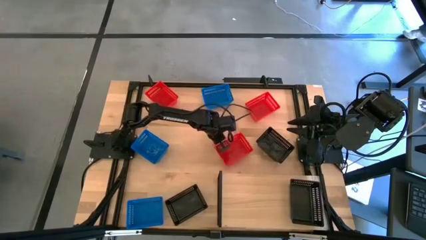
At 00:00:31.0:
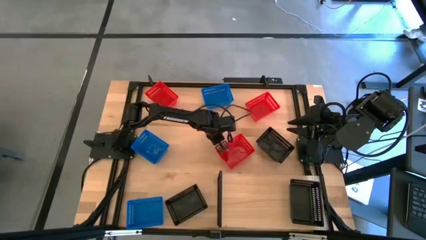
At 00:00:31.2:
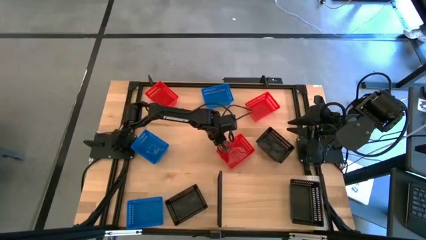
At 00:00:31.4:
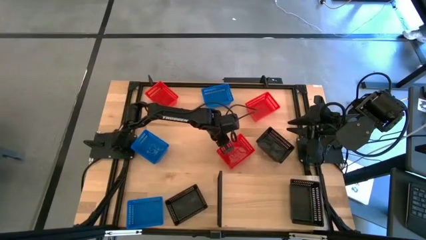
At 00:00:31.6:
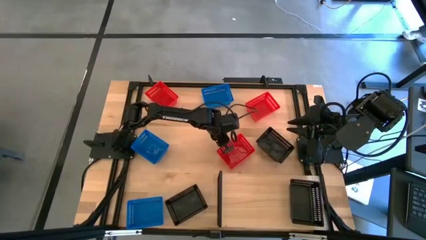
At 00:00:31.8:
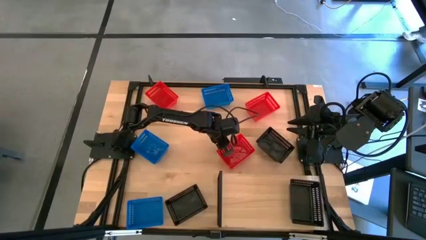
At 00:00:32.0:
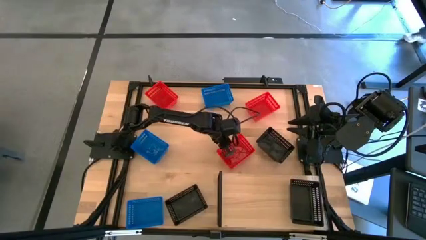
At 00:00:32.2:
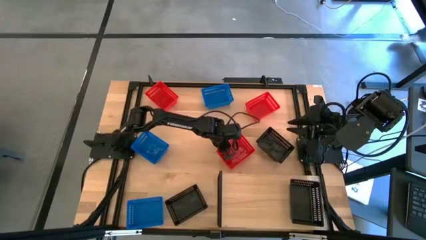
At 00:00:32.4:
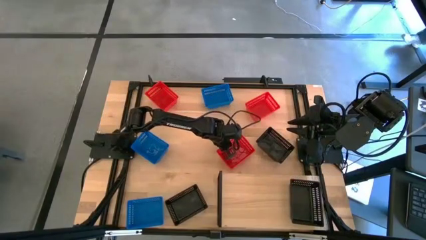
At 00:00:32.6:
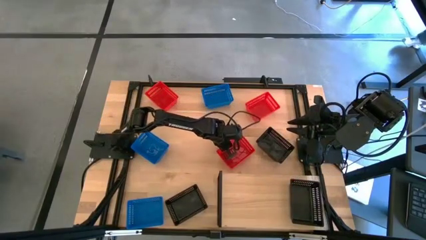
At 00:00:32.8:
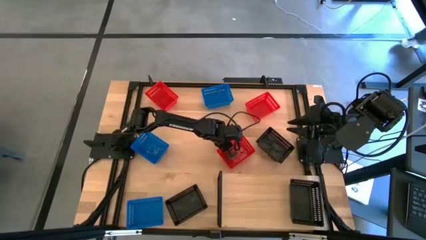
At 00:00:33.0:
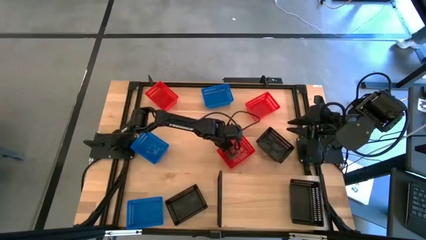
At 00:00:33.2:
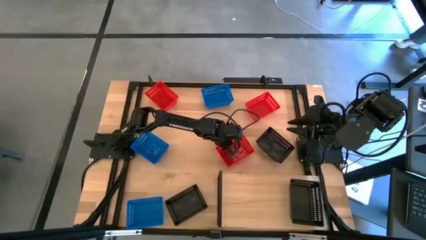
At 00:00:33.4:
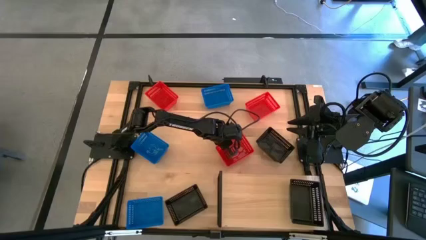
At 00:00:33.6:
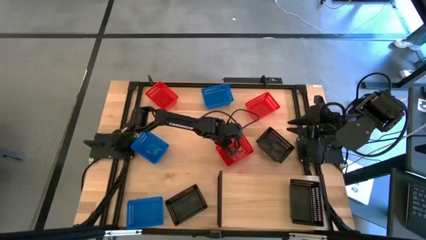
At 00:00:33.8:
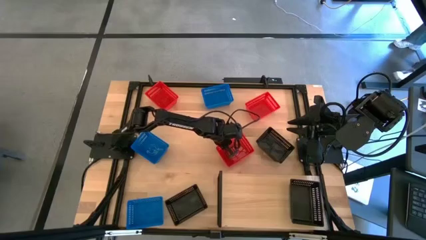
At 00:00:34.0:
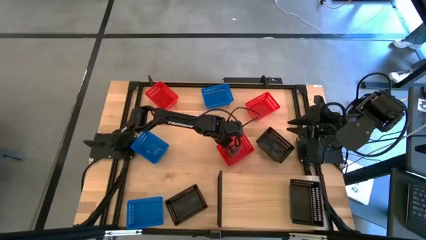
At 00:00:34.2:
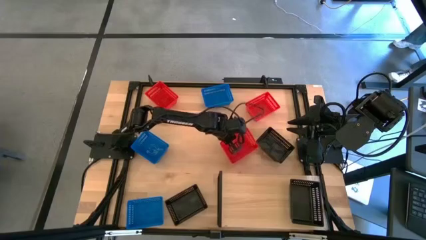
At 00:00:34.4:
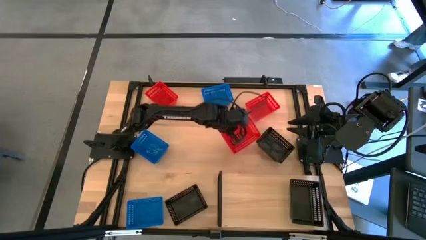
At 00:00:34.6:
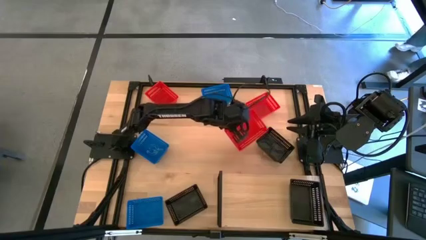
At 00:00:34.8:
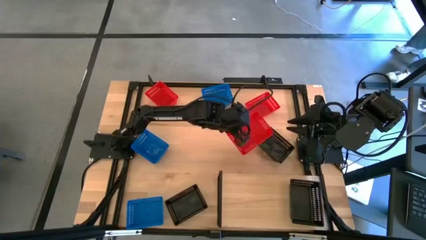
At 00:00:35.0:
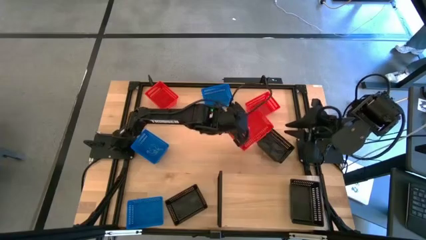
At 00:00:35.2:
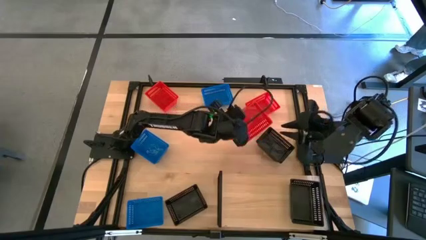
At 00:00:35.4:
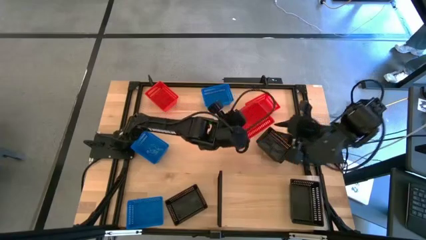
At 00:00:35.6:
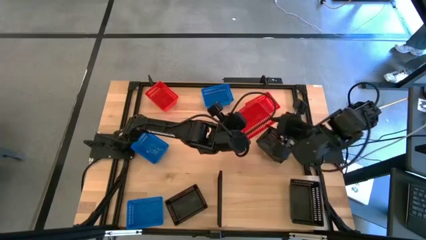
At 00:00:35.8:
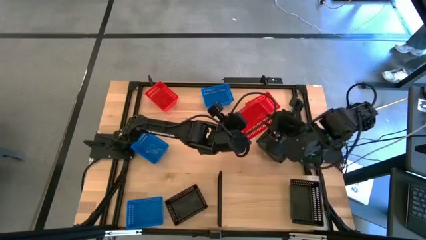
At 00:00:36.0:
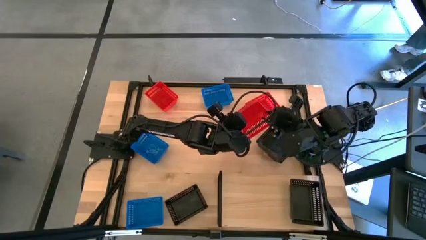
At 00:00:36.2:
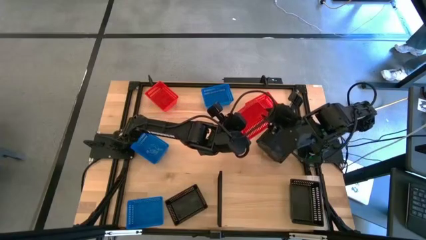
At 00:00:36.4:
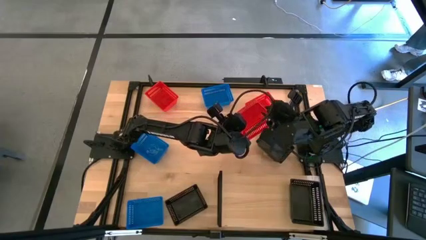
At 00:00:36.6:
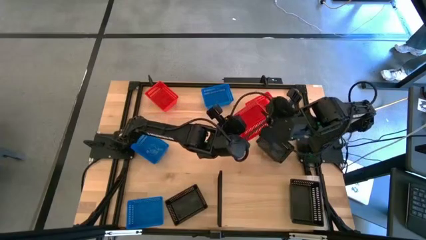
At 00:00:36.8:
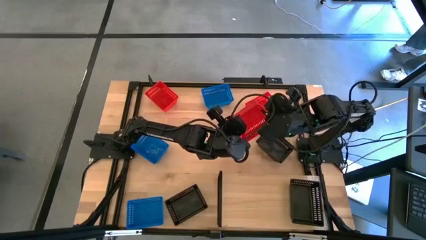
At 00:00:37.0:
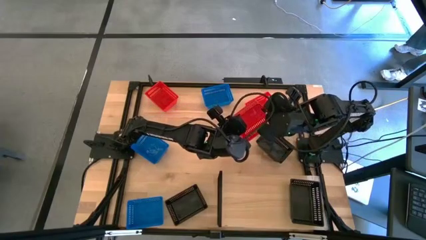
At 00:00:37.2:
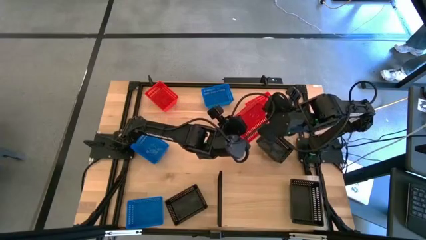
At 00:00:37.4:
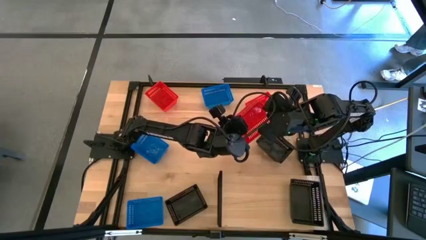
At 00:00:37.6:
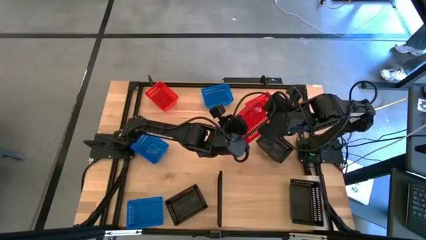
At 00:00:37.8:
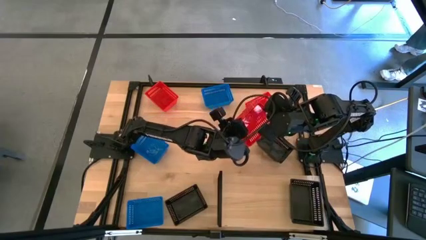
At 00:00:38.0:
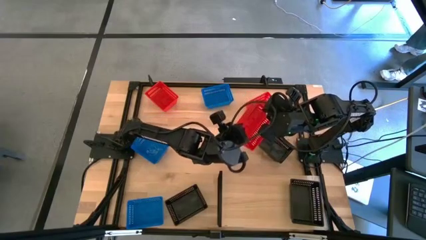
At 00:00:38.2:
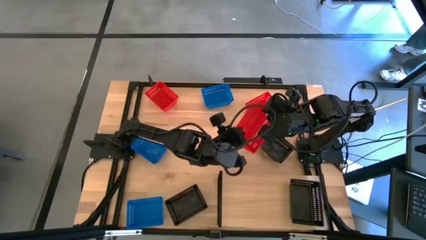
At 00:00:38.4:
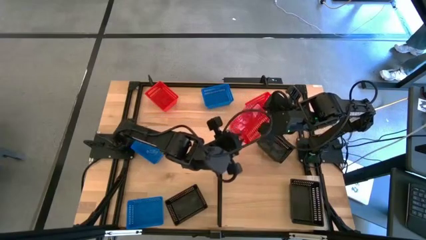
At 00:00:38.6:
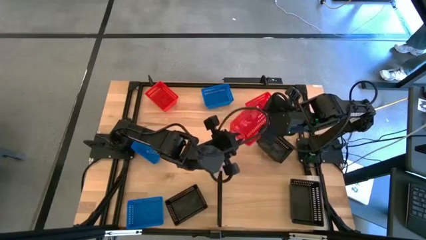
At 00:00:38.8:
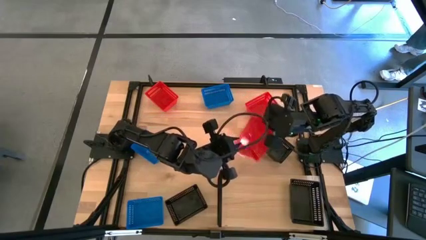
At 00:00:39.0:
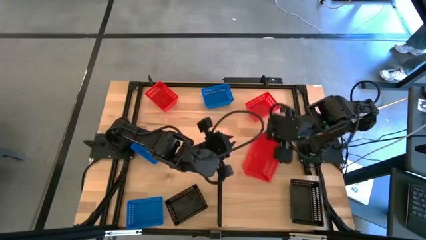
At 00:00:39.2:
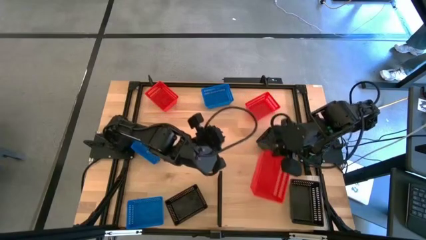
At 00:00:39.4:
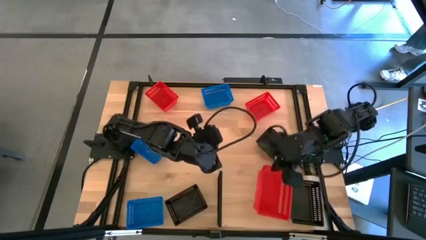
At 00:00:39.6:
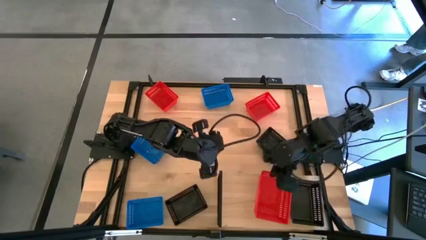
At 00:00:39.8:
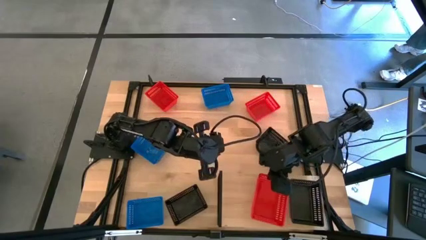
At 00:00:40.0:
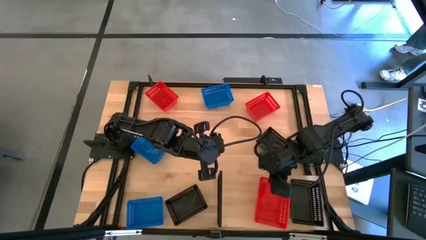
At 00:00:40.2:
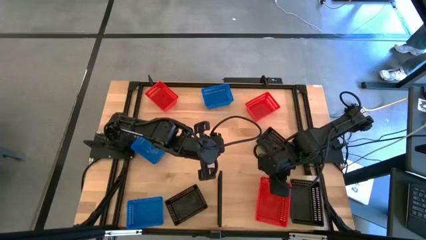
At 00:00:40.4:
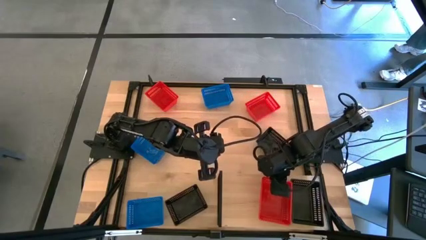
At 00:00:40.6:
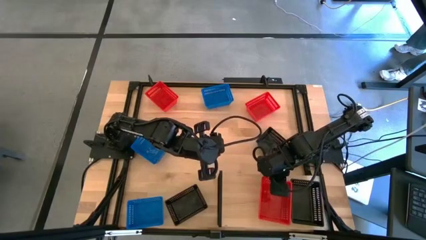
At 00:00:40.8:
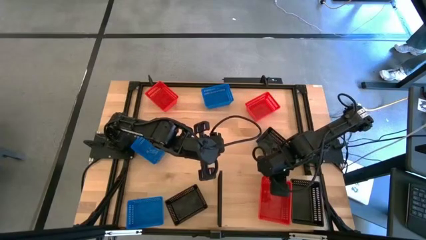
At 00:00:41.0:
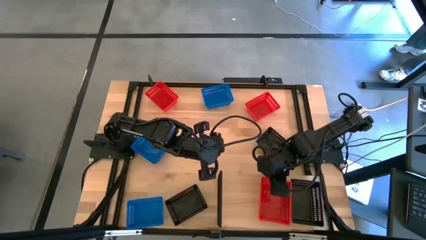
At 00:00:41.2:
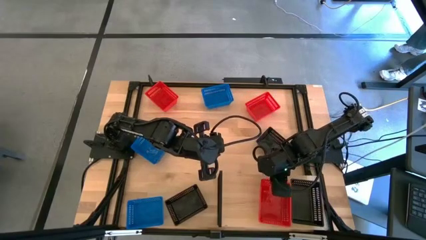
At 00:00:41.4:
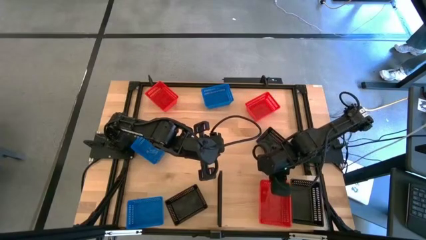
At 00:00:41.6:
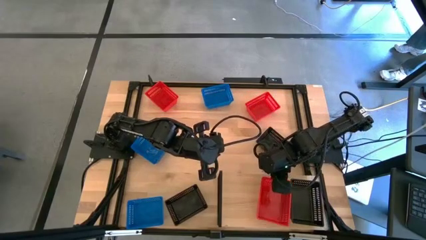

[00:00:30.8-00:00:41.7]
Task: Stack baskets on shelf by color
Put the bottom red bin on the shelf

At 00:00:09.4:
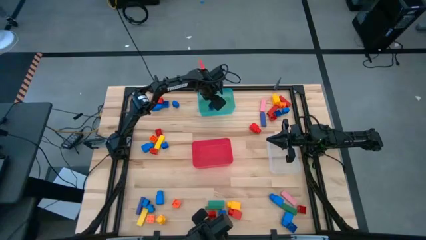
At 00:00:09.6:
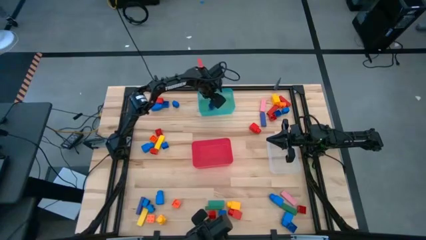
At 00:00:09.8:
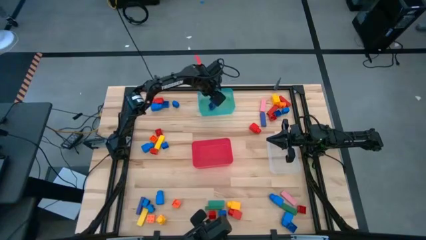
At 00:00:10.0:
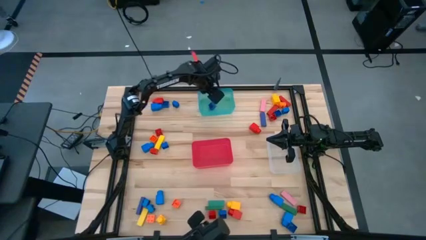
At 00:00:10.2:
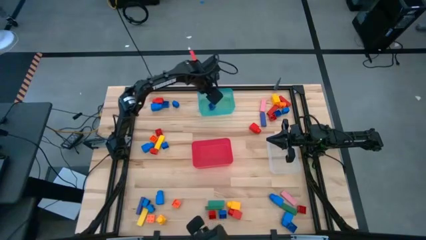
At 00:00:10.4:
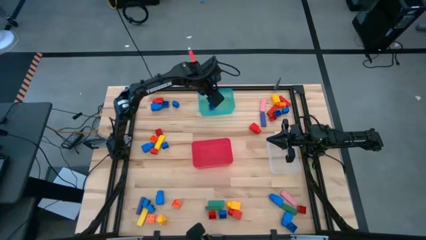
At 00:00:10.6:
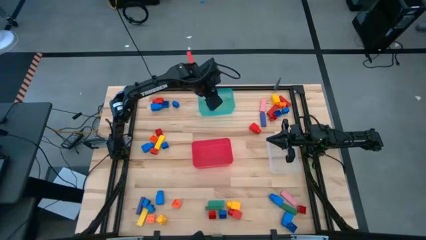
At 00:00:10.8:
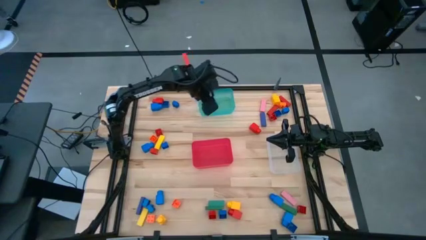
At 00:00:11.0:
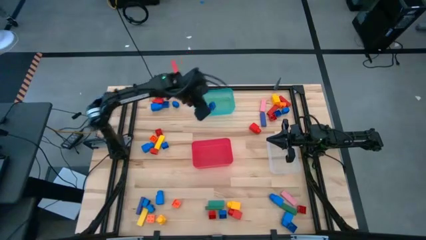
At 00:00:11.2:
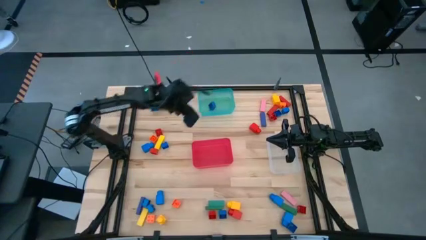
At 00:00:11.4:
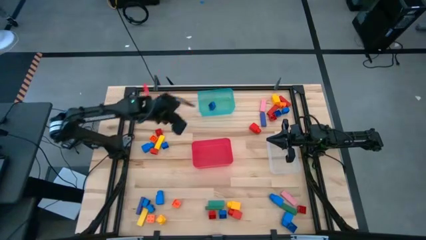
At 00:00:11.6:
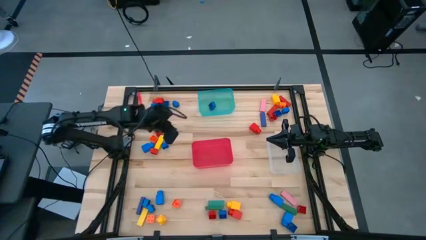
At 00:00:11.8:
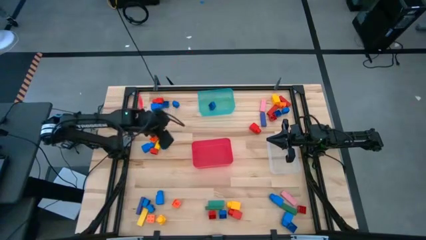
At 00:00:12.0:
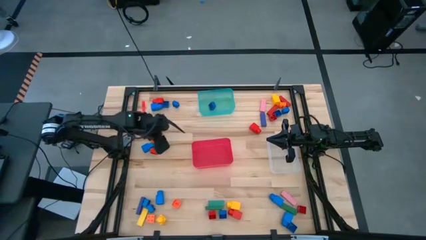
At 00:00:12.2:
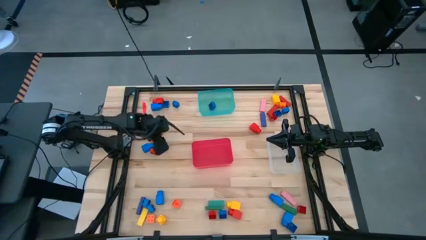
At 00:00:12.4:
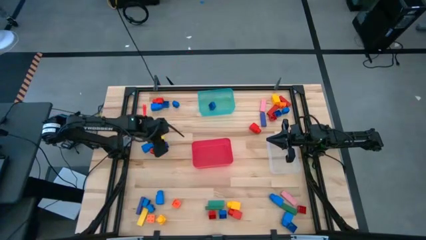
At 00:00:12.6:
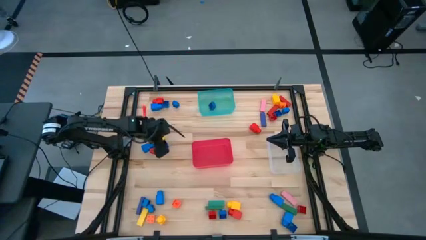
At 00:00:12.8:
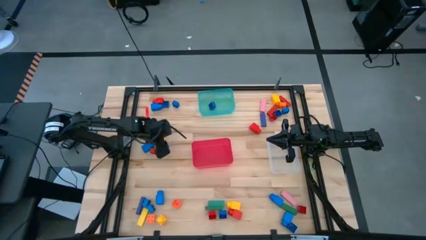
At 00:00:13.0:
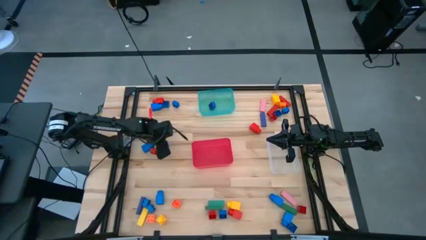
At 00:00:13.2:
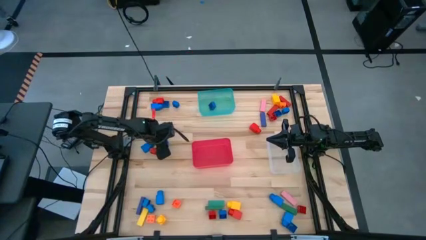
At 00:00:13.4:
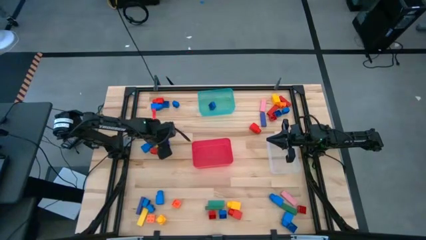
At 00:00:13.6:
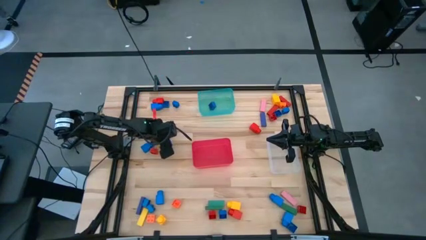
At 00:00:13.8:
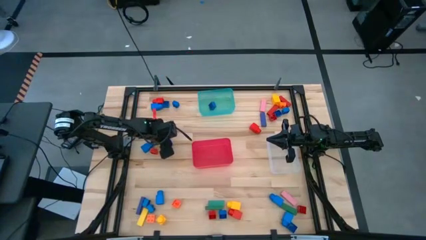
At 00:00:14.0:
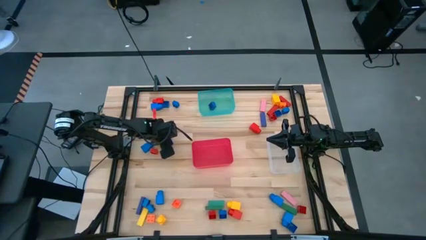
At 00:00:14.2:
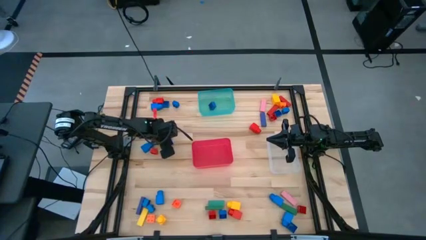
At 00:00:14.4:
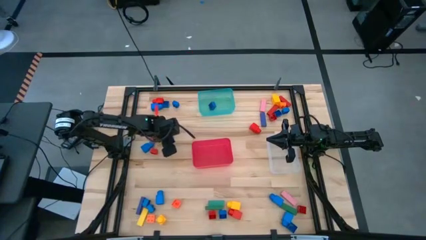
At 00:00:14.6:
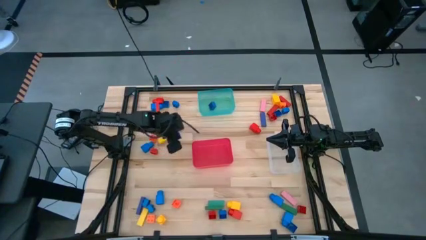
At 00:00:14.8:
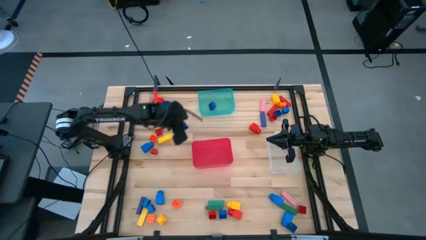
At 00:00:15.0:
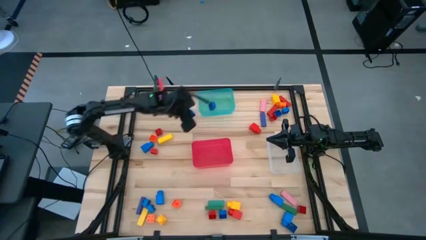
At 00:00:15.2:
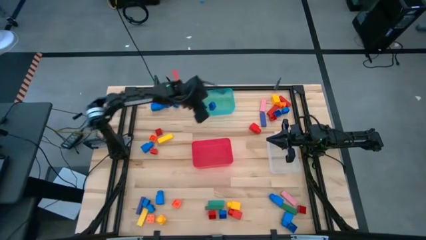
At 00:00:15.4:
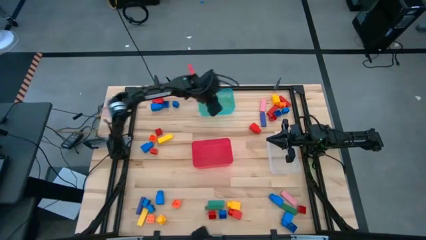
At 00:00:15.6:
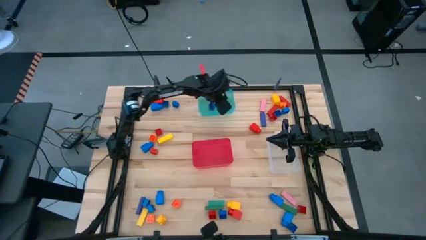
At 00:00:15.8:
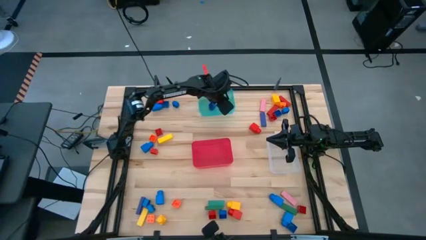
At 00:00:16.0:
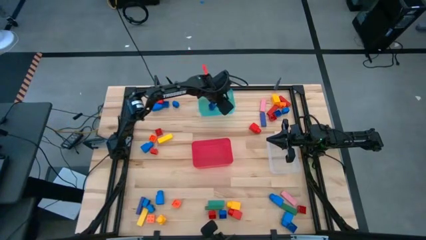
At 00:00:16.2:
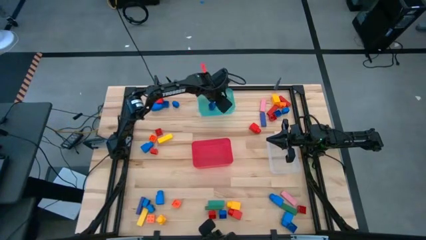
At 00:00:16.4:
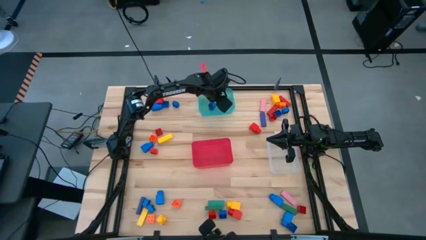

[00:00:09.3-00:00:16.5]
Task: Sort blocks by size
Put the blue 4 stud game piece into the blue bin
